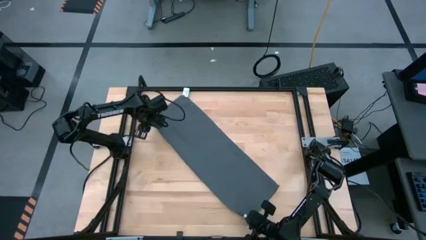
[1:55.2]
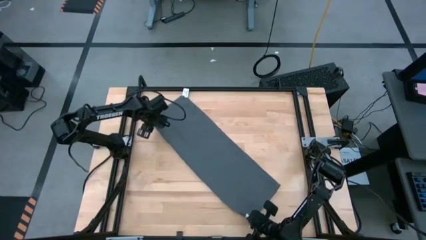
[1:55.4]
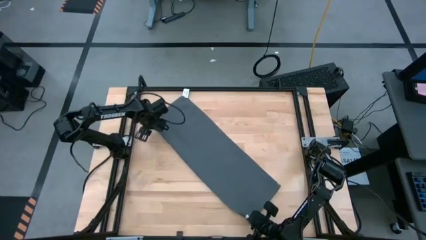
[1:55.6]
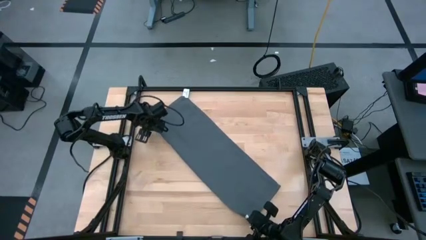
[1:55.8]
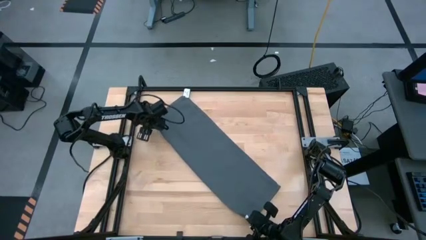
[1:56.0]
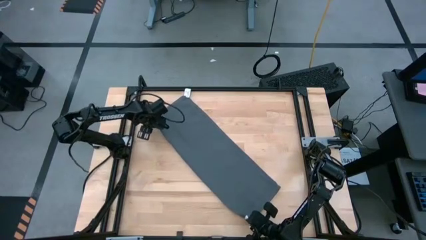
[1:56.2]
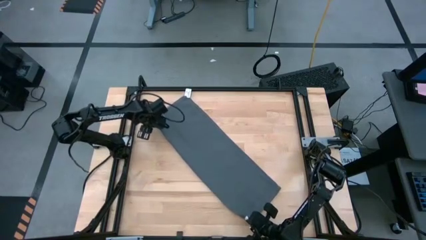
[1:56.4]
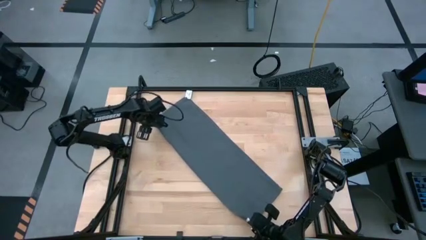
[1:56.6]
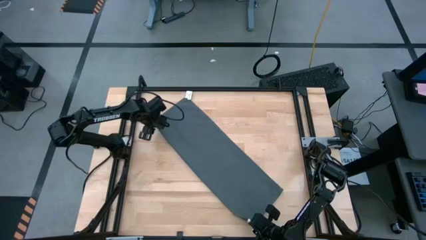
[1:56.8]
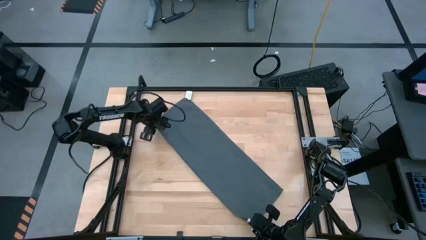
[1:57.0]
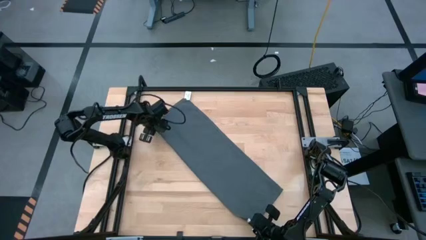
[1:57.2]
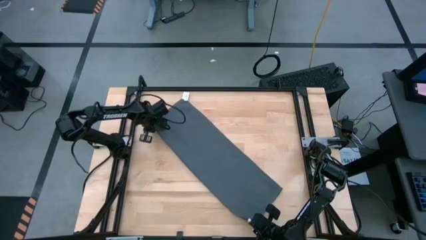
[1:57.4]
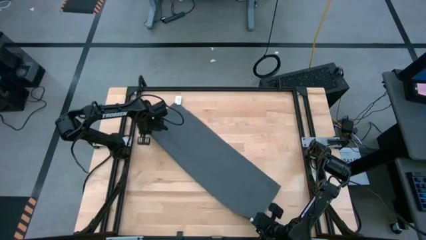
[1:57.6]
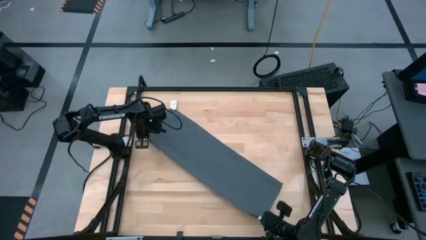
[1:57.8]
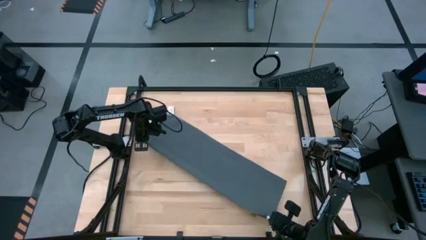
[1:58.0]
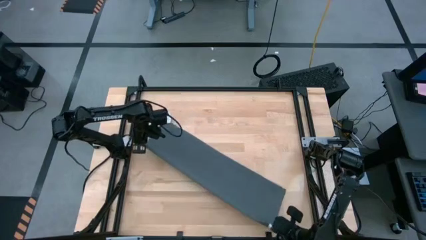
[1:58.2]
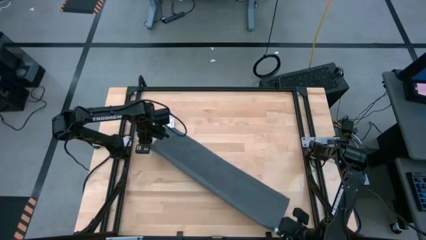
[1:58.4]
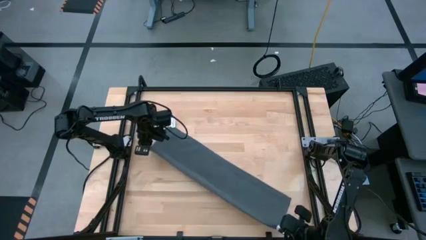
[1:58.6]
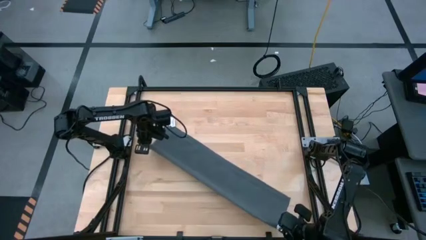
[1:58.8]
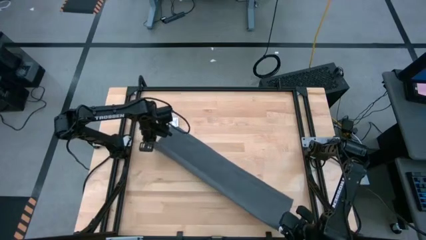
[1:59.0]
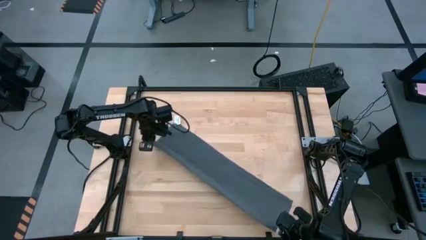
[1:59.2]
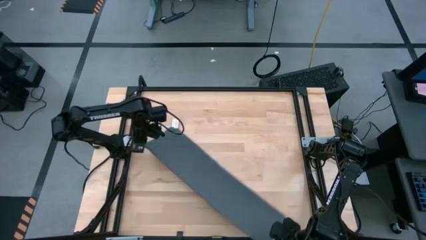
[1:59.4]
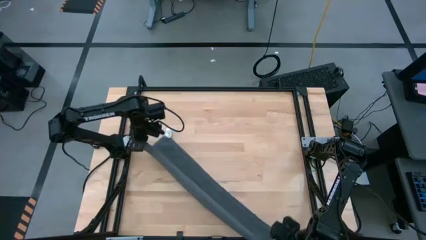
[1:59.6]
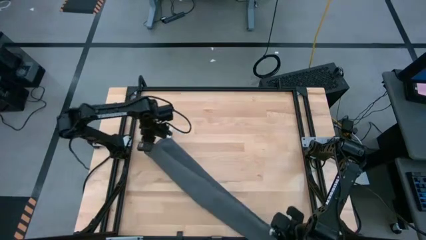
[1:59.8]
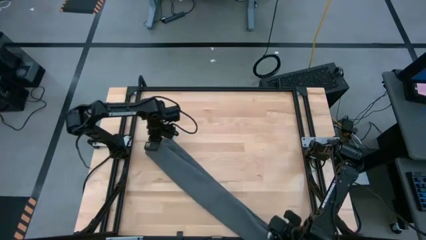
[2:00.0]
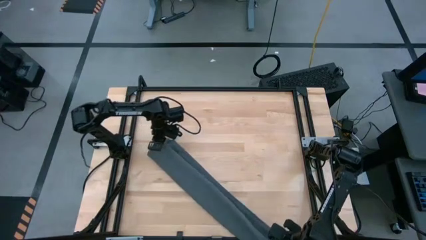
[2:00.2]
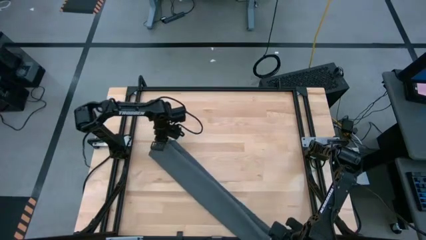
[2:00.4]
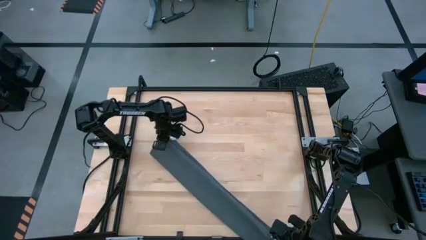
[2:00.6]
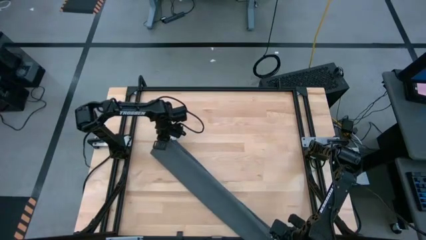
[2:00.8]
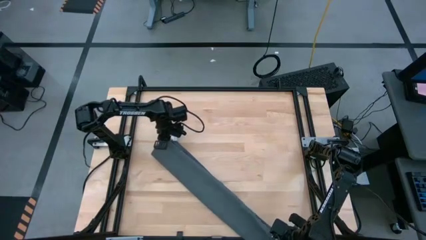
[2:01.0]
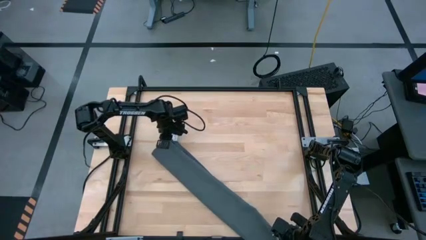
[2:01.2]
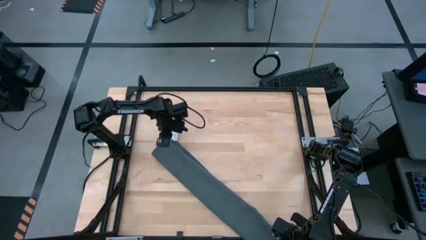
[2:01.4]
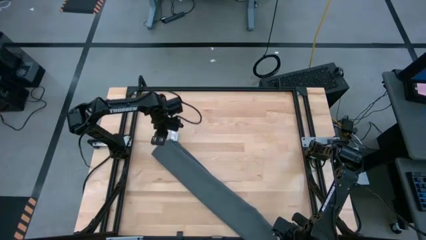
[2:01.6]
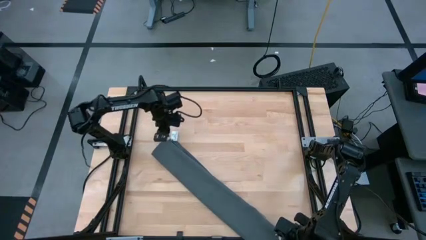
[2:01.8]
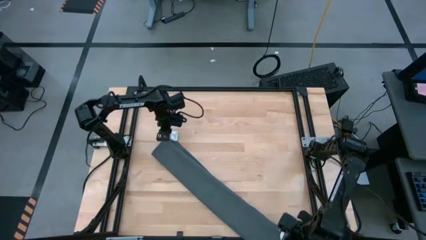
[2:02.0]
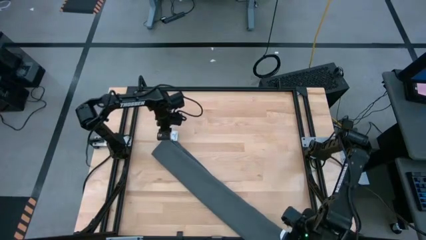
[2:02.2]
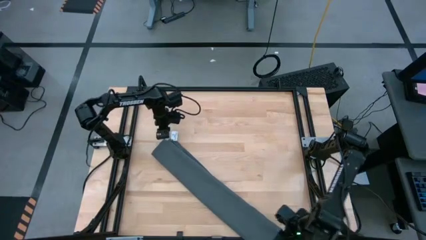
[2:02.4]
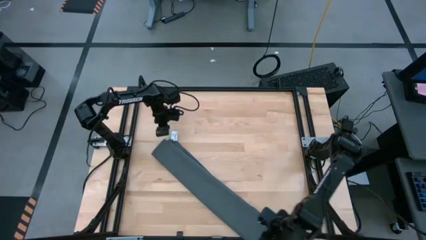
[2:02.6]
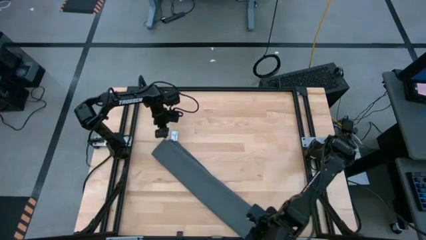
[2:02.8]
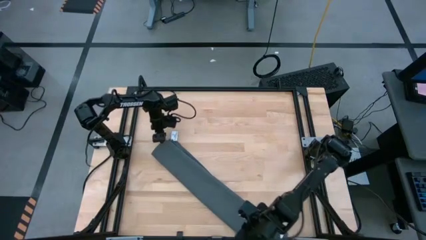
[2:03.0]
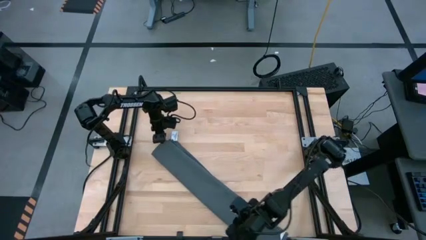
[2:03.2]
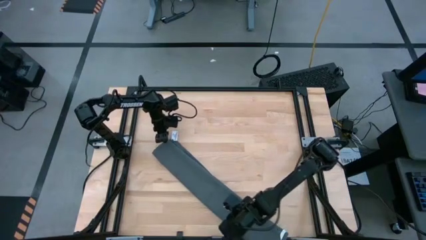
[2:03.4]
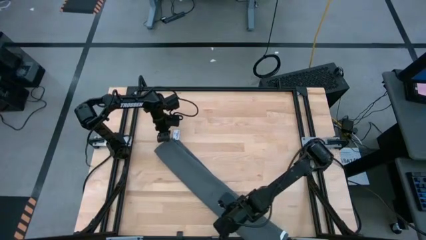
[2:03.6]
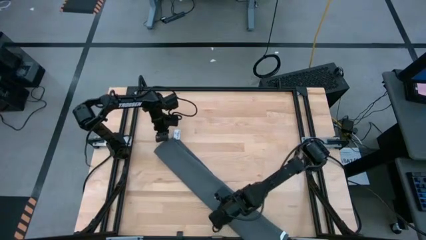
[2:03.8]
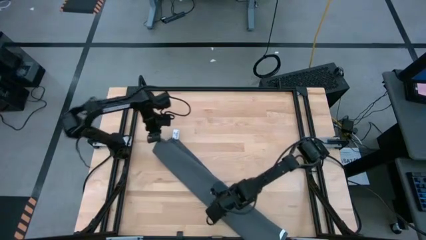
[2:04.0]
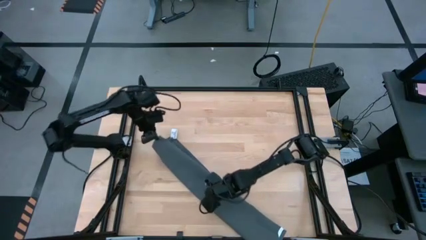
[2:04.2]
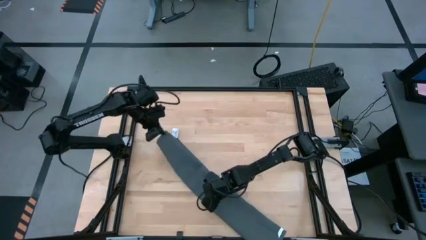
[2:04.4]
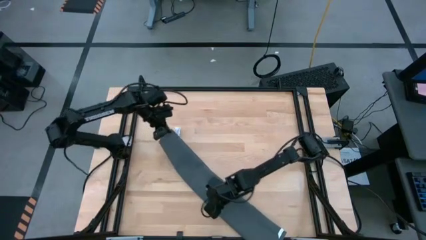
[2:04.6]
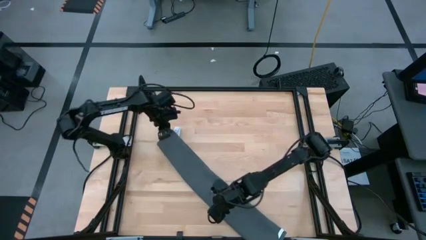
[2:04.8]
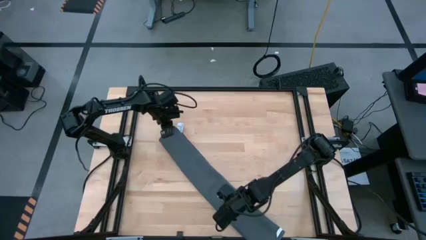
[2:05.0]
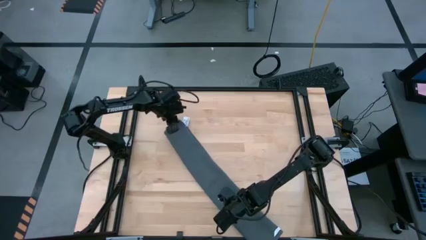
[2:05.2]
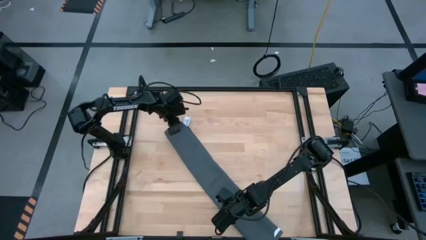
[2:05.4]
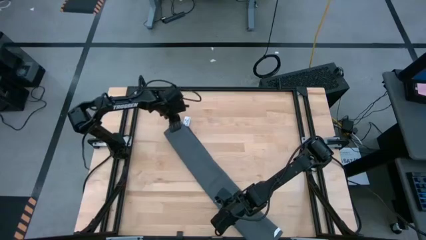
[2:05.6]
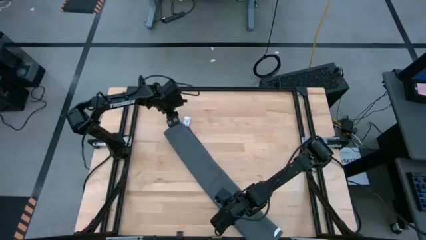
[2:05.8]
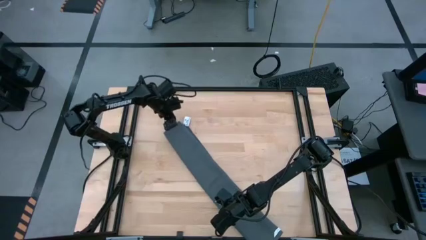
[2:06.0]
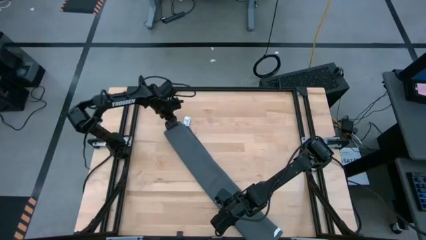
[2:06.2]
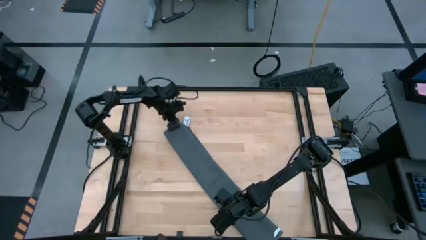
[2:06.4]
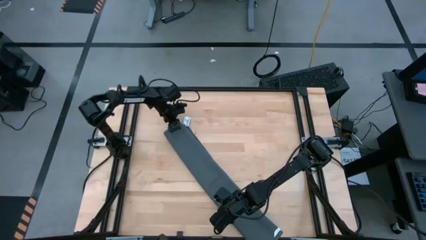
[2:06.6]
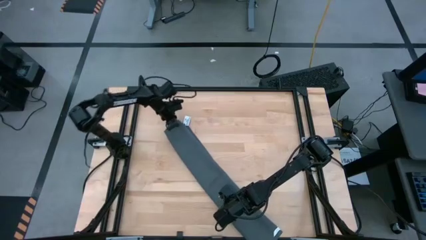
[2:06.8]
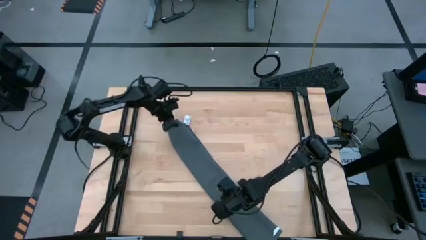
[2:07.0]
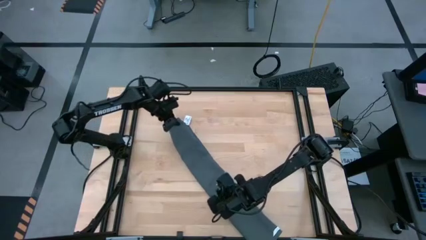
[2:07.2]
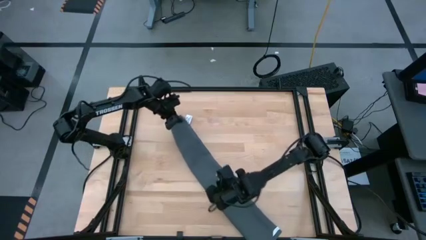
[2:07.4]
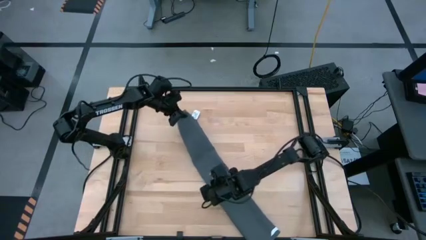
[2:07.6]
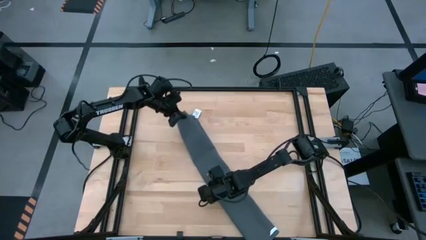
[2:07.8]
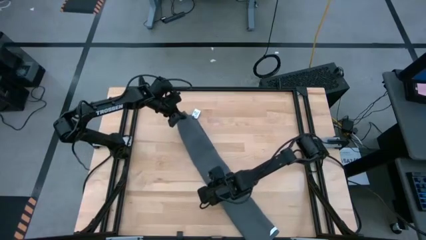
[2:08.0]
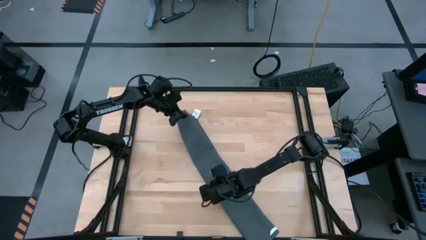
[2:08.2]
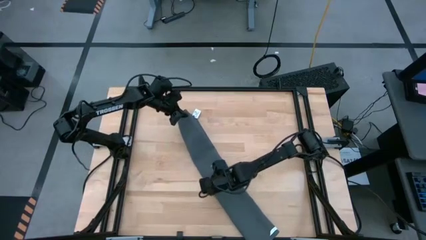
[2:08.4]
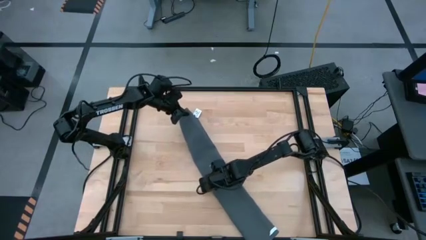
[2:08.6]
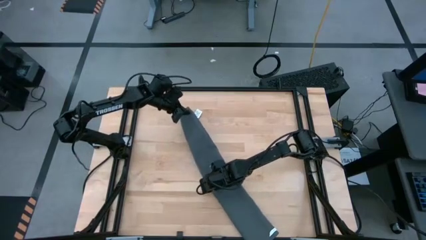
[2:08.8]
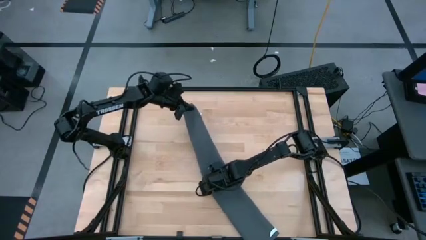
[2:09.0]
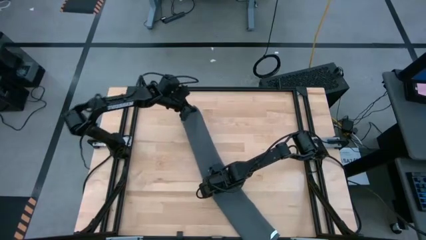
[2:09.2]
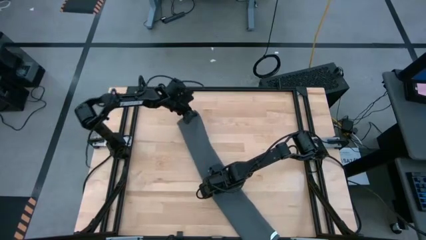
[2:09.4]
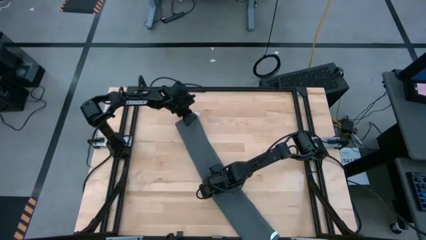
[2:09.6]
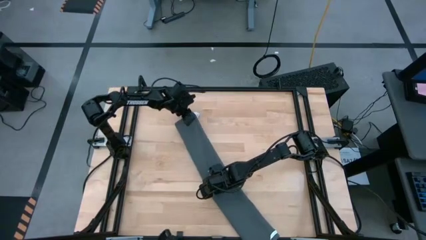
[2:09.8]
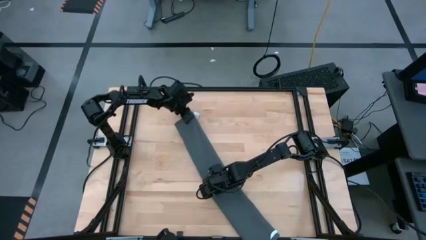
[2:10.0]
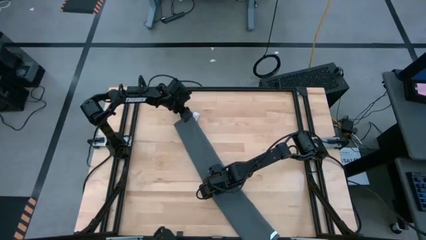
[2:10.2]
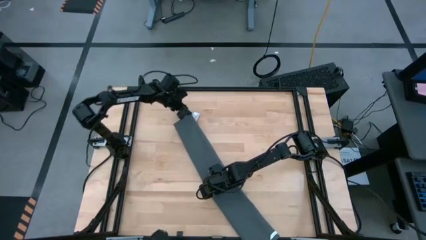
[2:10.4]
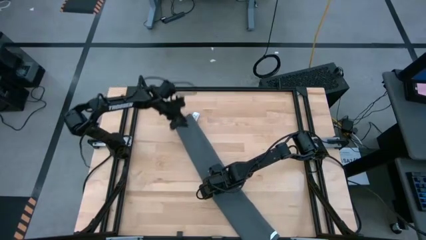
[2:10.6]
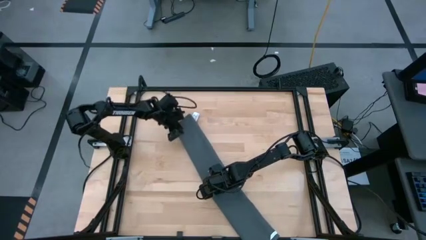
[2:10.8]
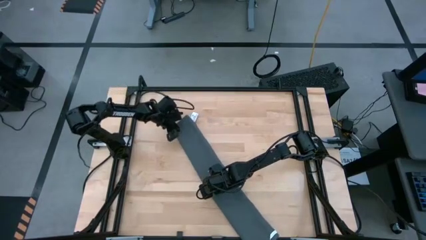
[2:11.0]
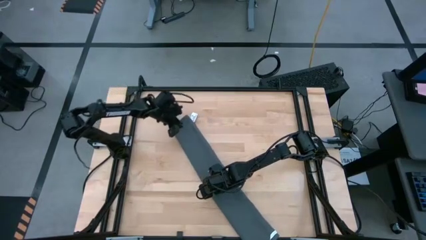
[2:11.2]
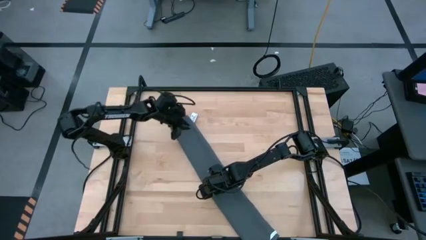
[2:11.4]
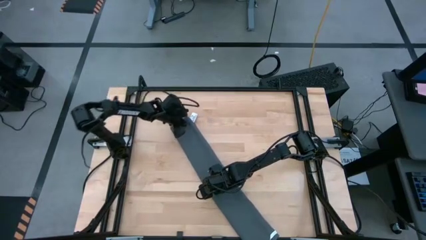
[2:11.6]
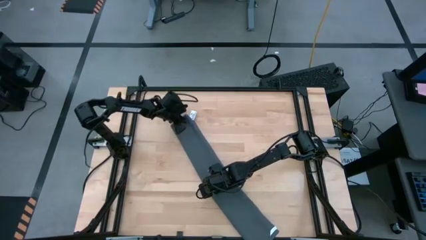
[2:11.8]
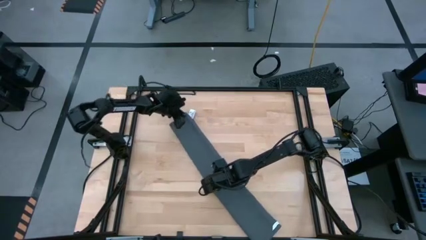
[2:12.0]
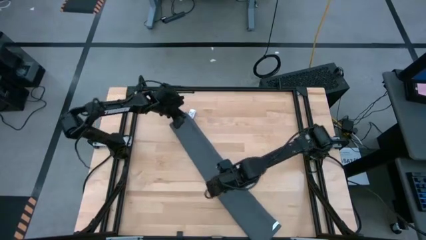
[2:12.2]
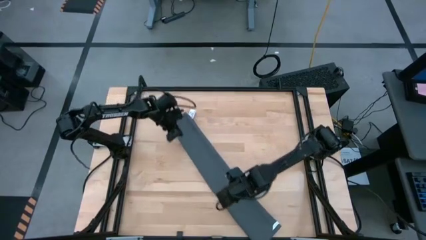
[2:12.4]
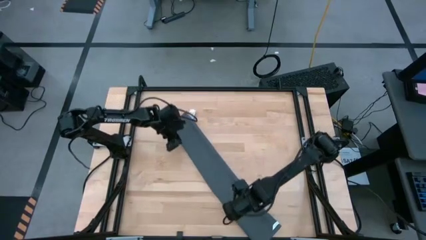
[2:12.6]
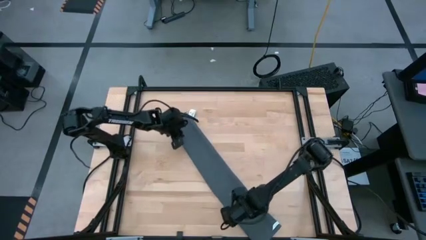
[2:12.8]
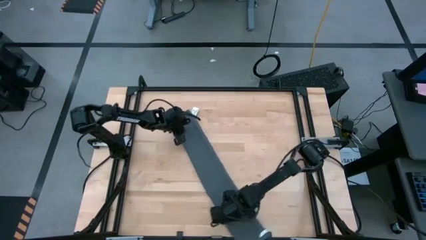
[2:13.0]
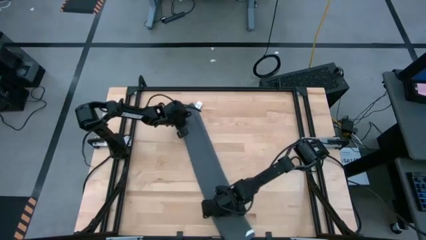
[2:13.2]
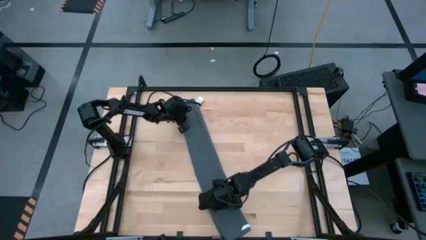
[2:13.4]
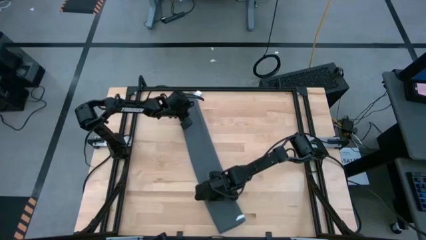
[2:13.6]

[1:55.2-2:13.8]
Task: Roll towel into tight, uniform cylinder
Roll the towel
